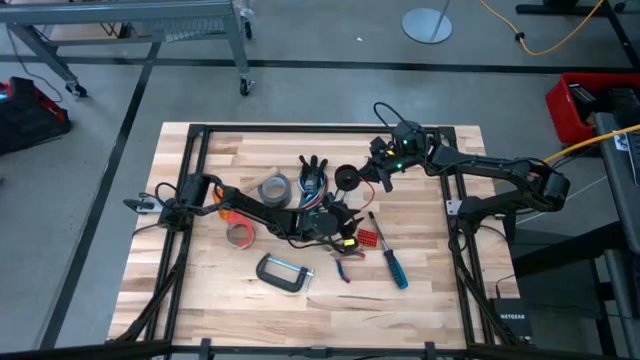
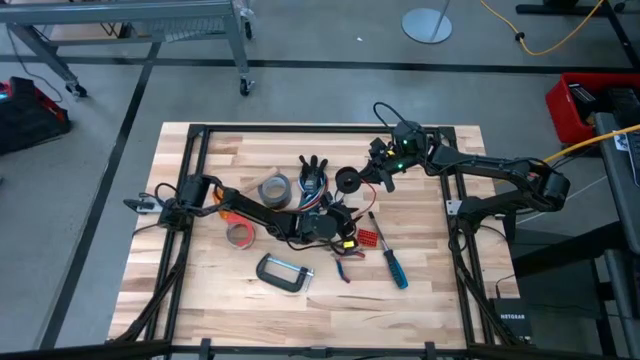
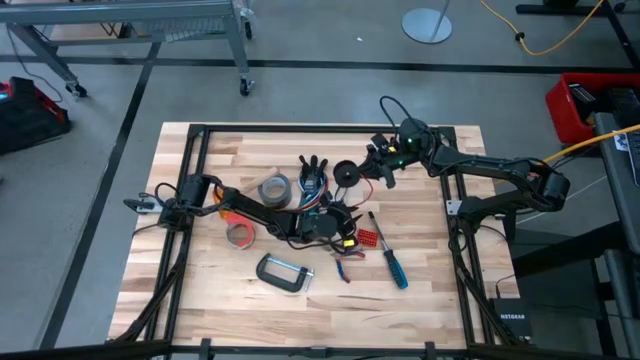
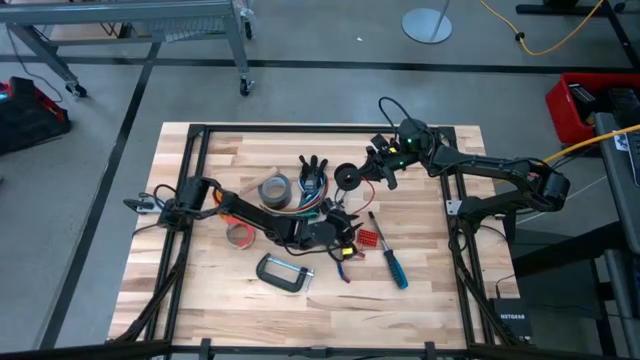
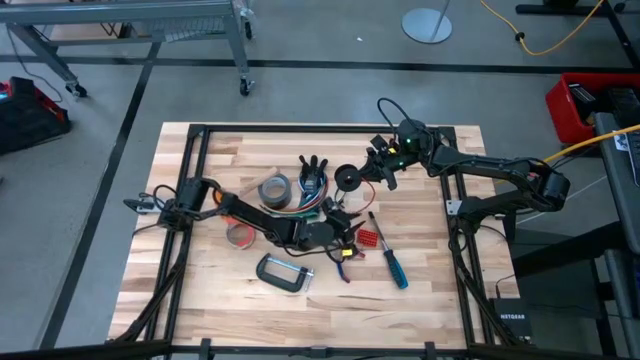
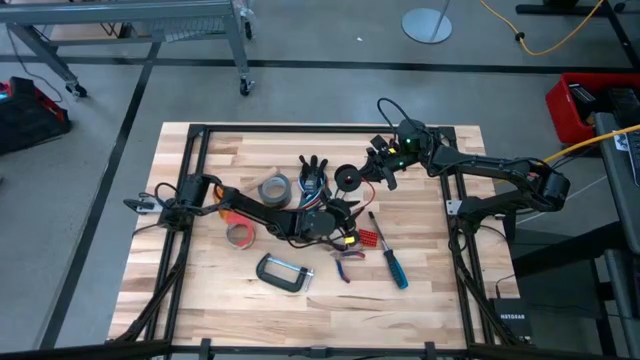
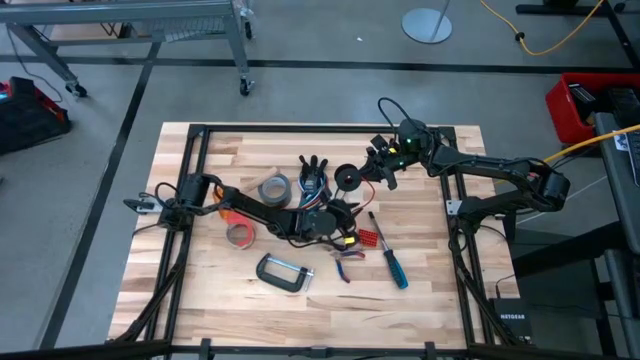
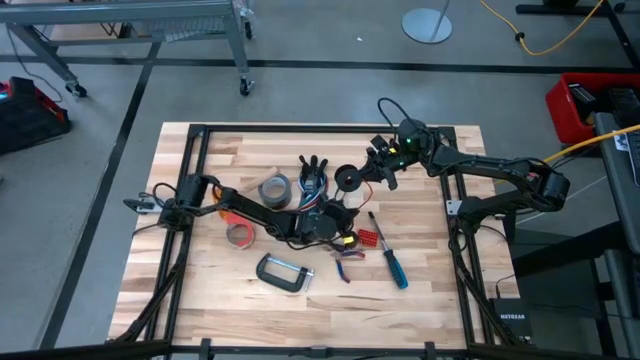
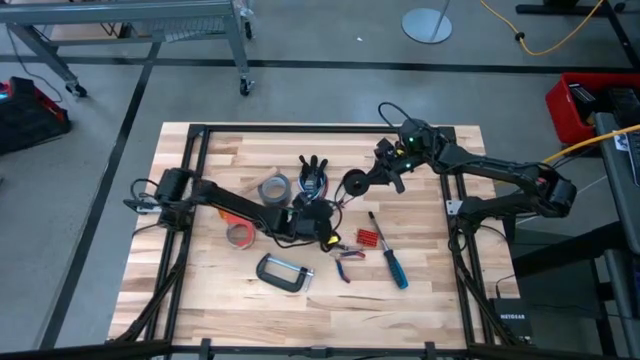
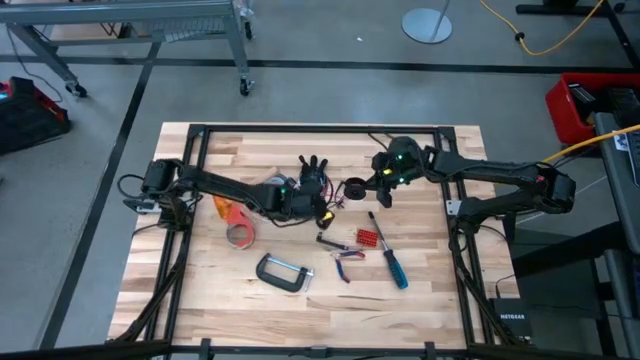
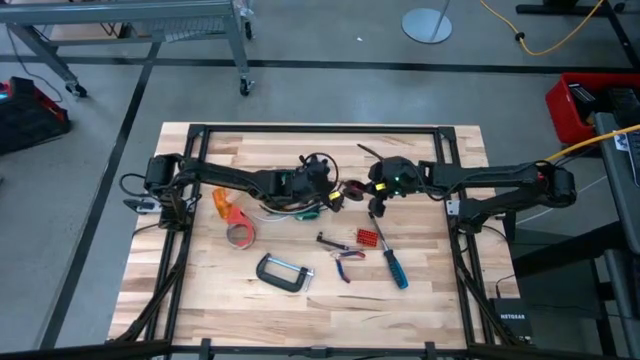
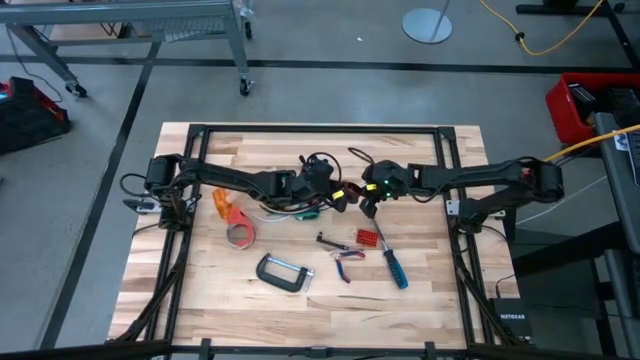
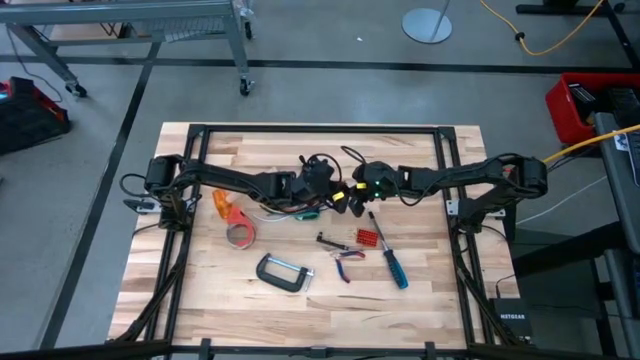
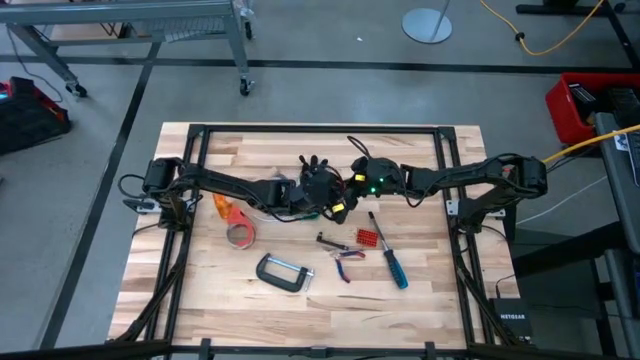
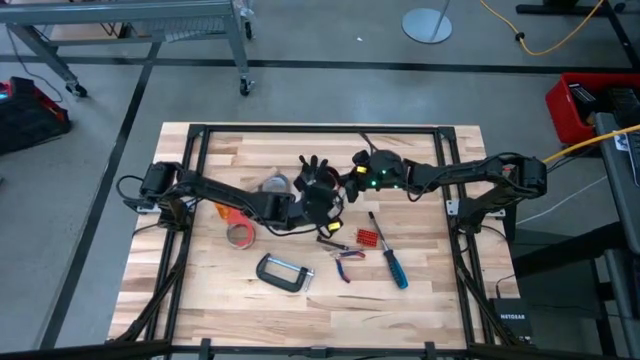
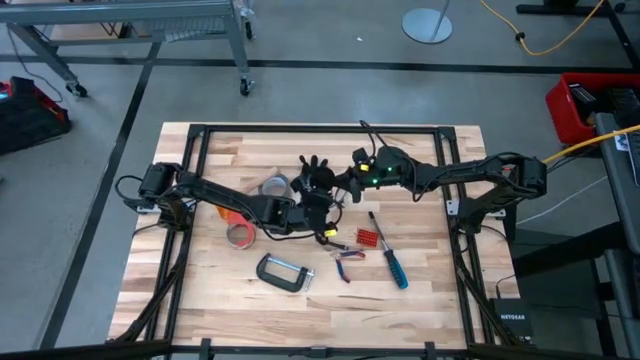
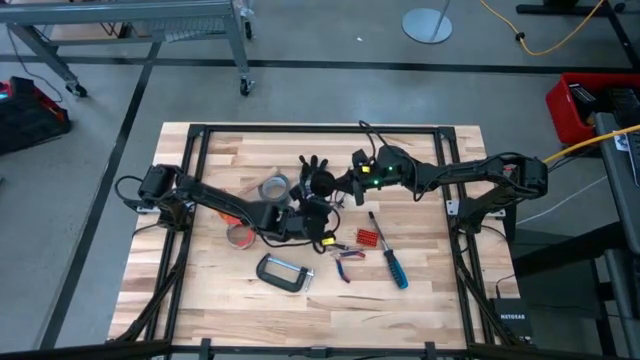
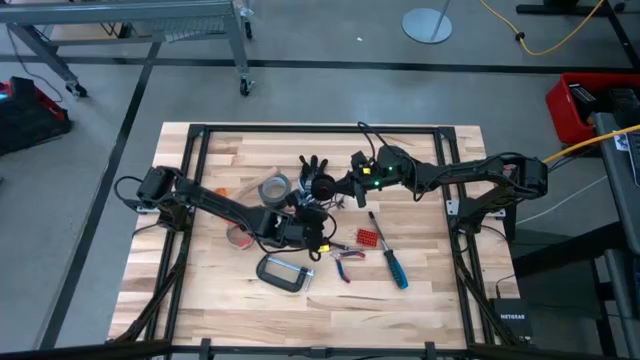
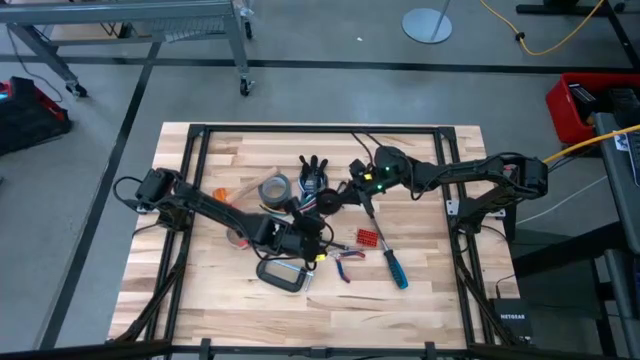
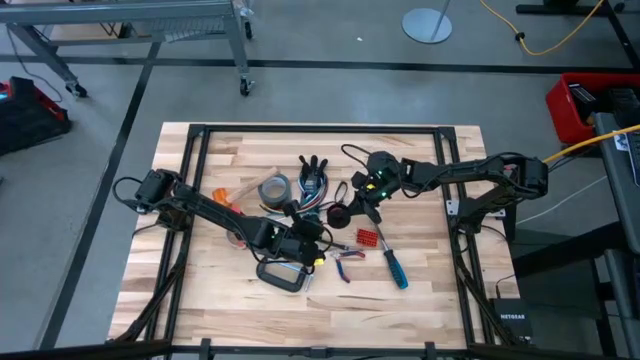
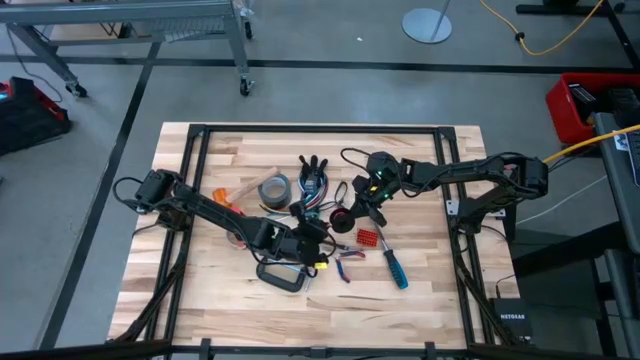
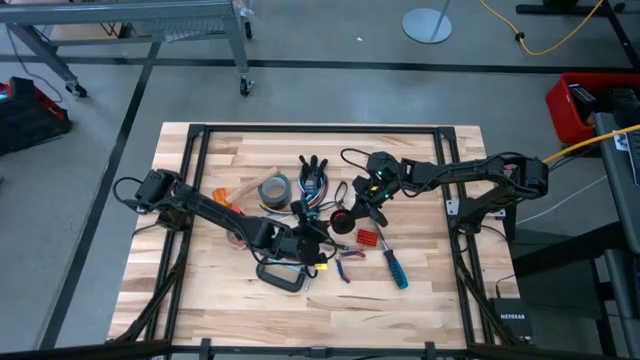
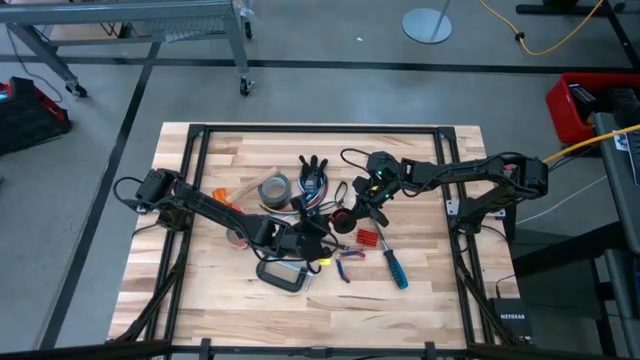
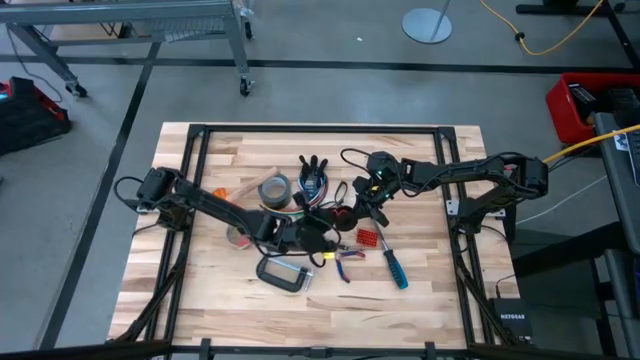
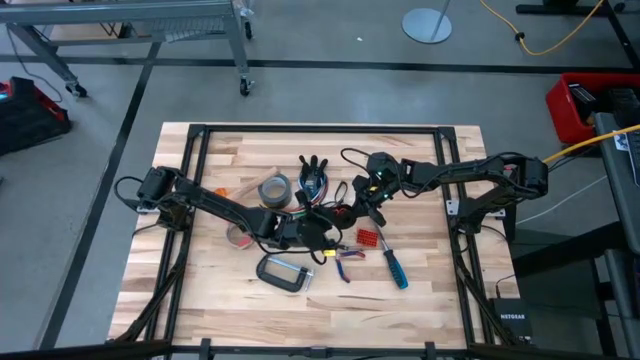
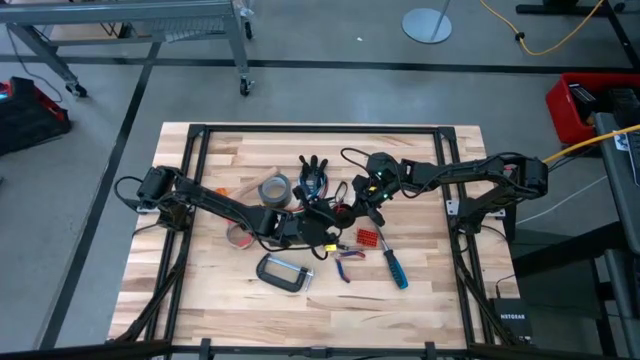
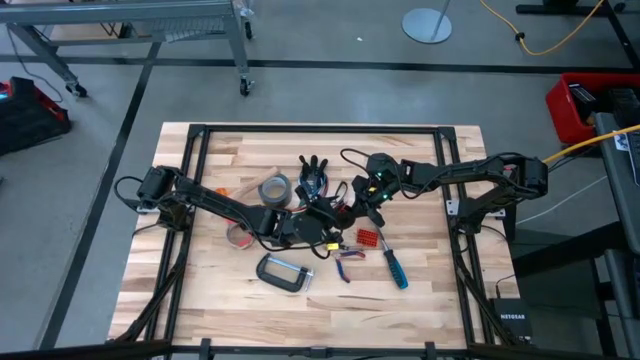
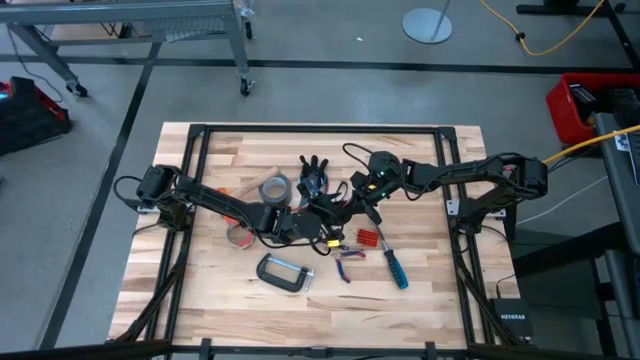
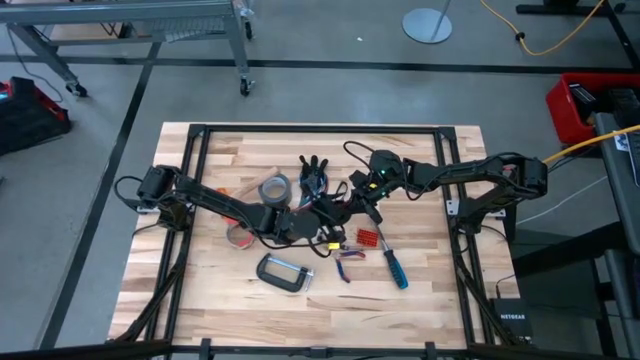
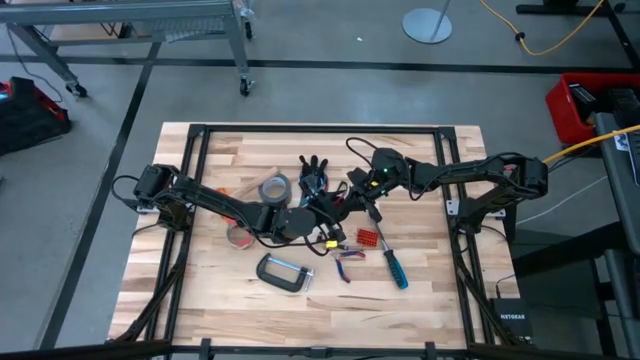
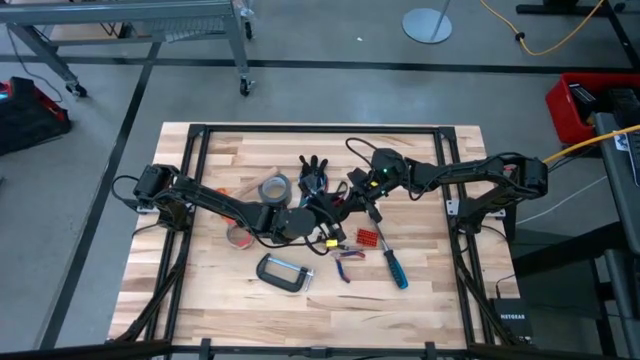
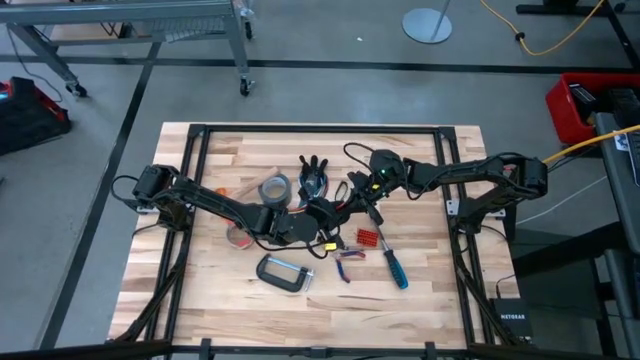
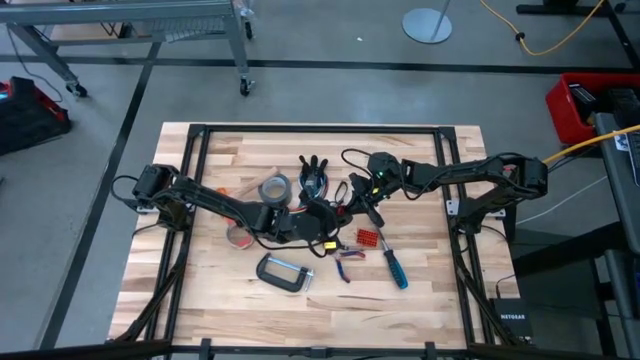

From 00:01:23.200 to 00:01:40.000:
Task: Coil cords
Coil the red wire onto a black spool

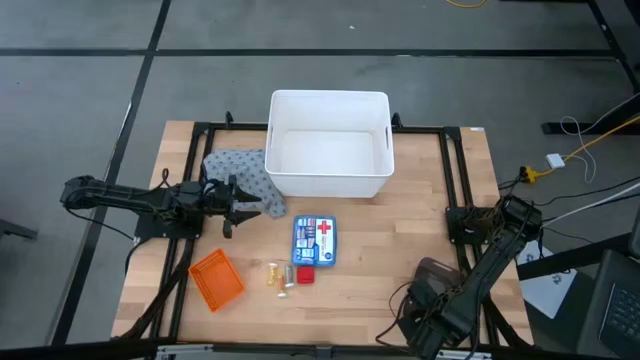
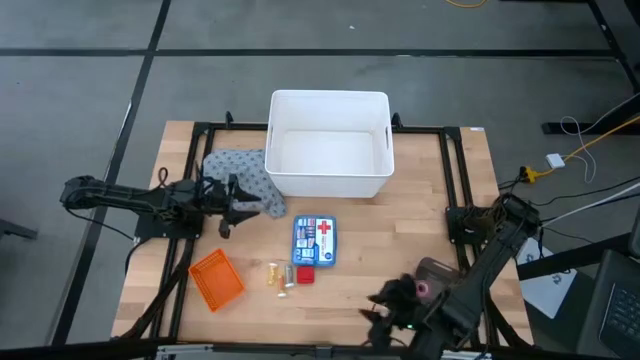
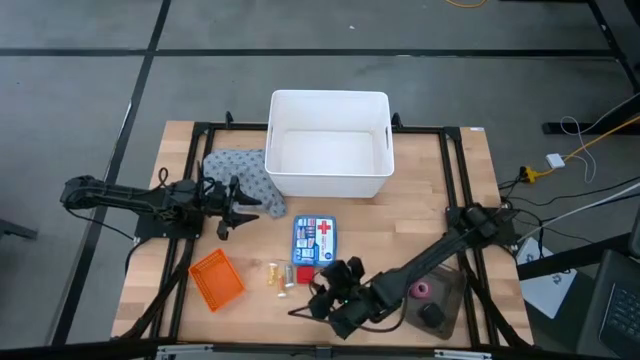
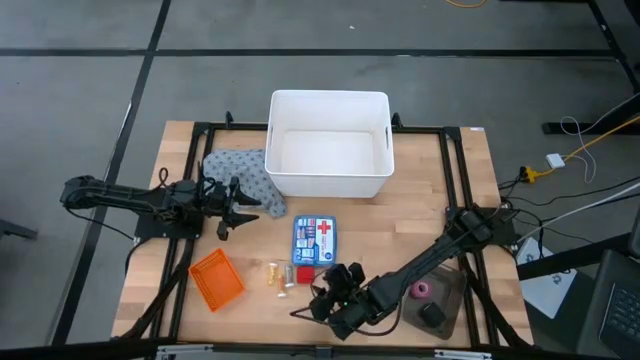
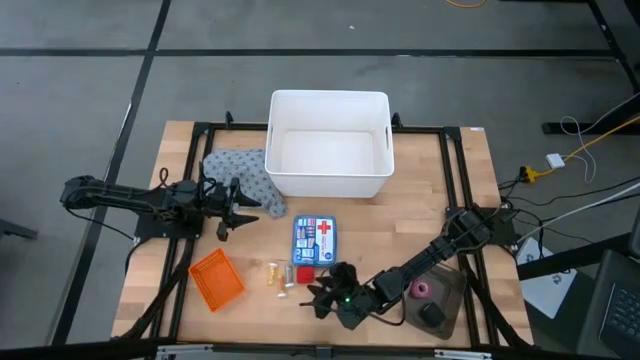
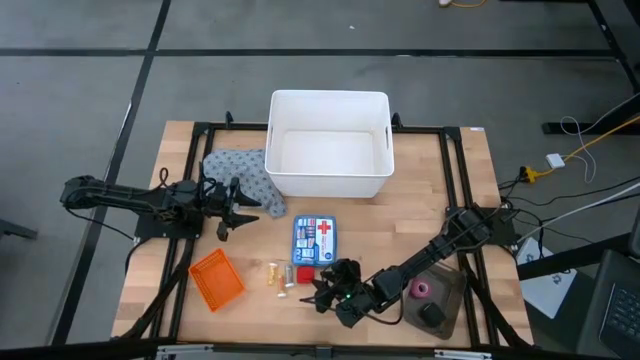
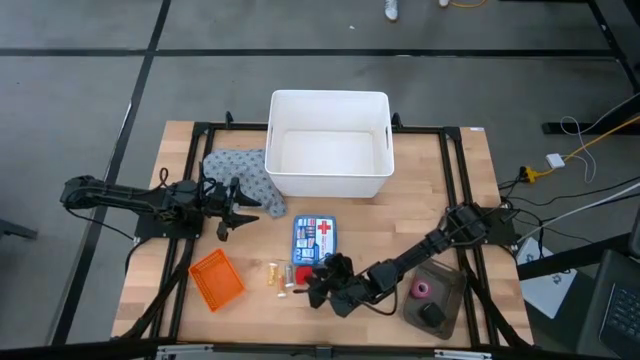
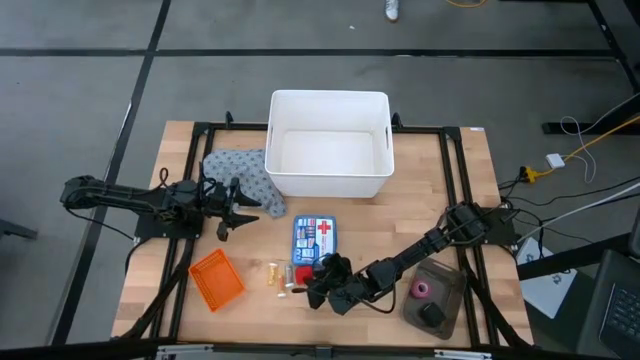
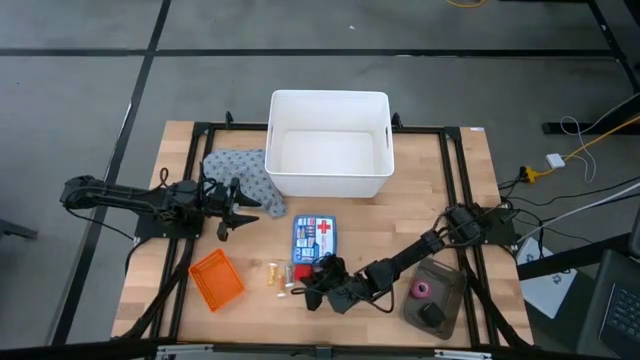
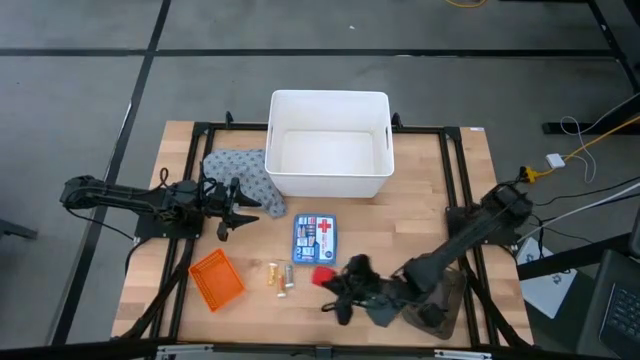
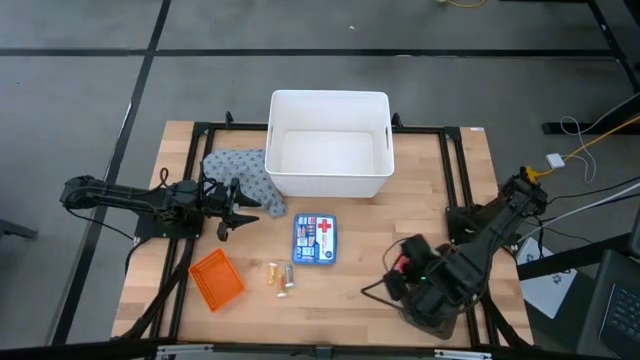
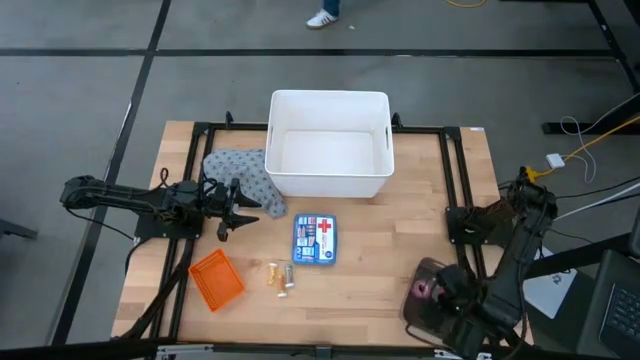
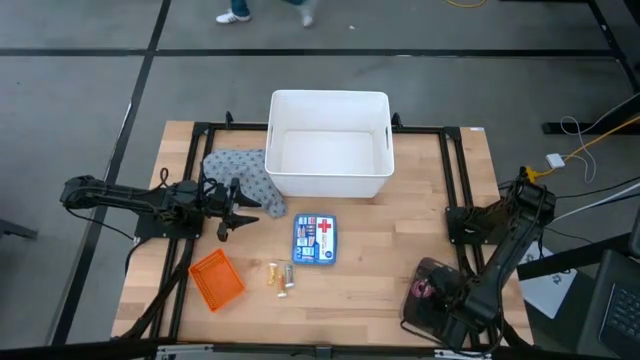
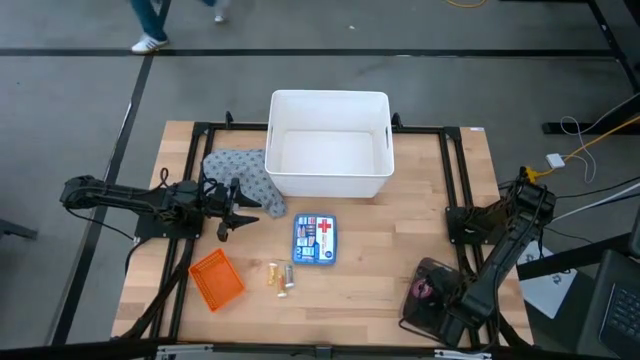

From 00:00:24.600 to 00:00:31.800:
Task: Pick & place medical supplies in basket/bin
Put the red bandage into the black bin
